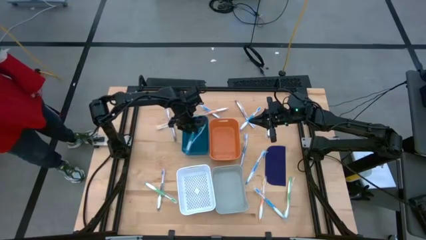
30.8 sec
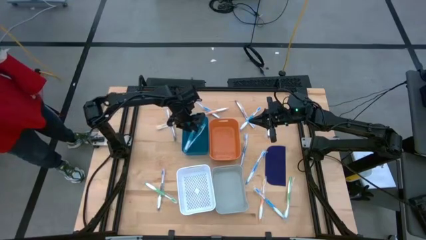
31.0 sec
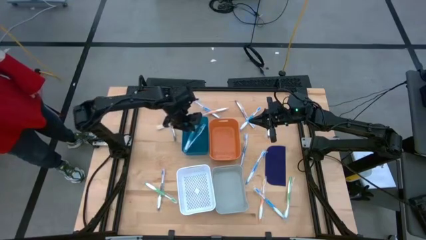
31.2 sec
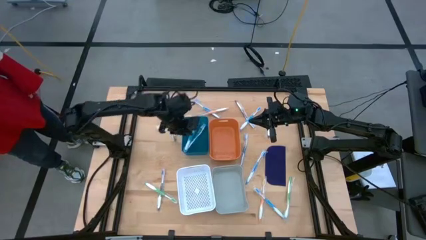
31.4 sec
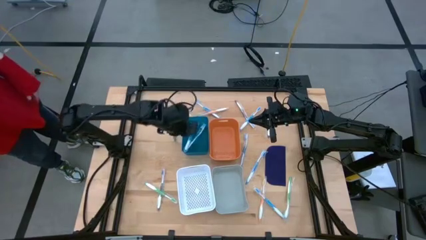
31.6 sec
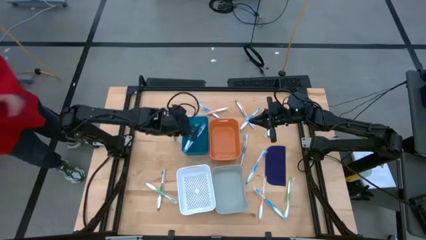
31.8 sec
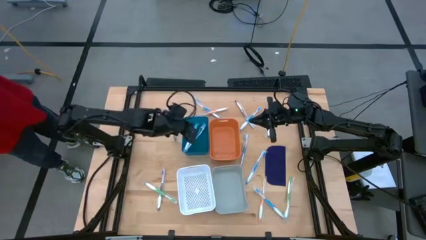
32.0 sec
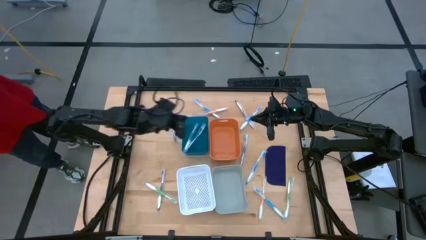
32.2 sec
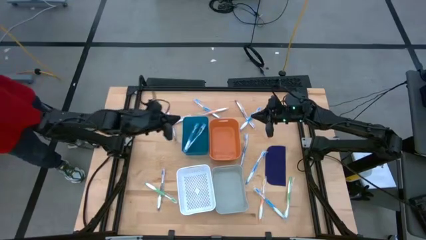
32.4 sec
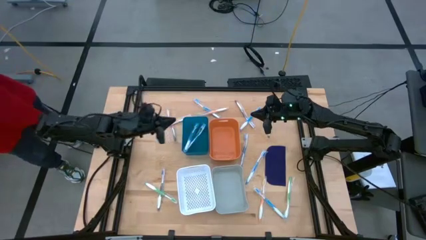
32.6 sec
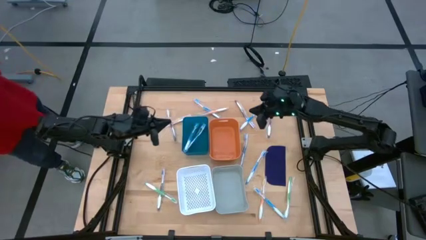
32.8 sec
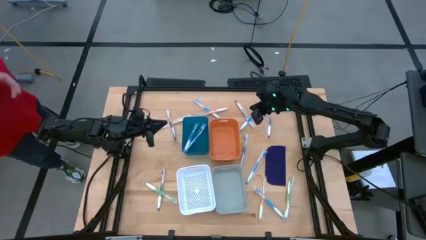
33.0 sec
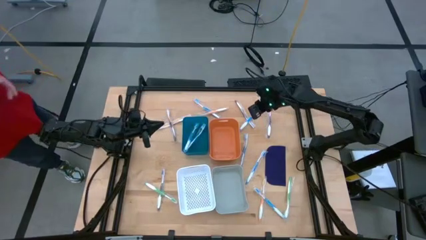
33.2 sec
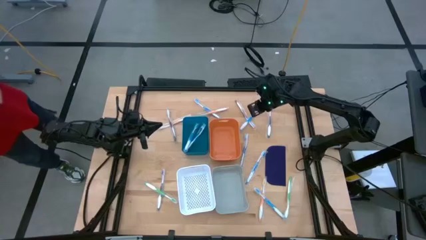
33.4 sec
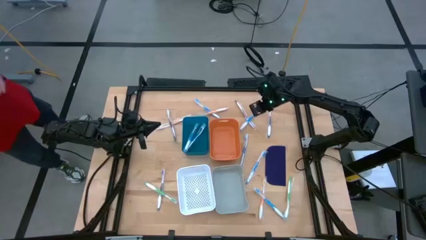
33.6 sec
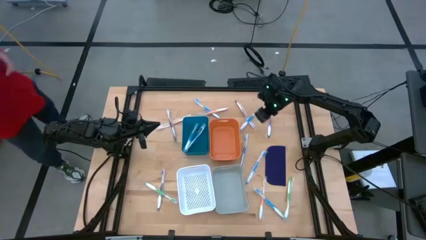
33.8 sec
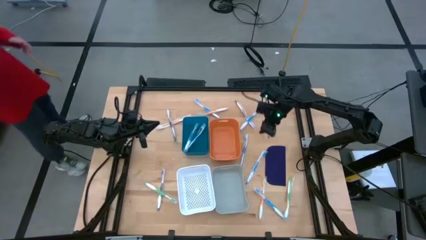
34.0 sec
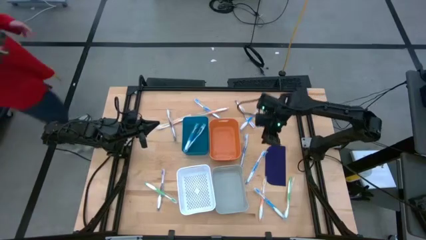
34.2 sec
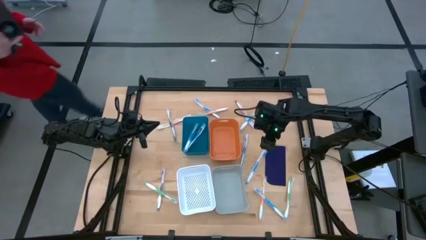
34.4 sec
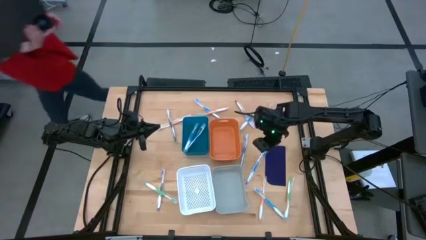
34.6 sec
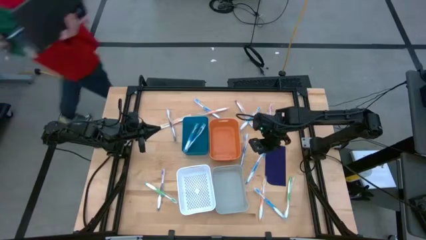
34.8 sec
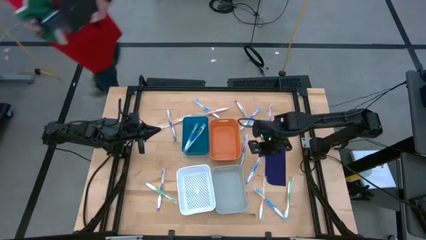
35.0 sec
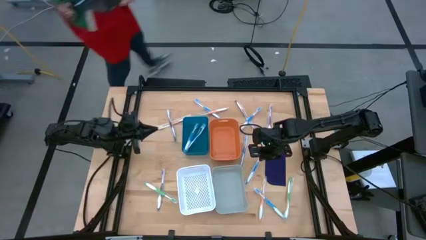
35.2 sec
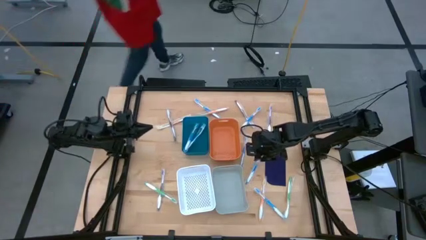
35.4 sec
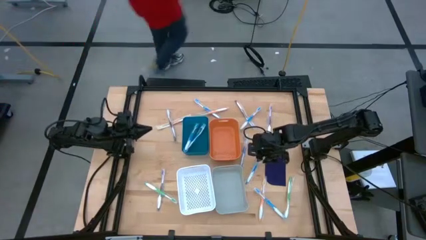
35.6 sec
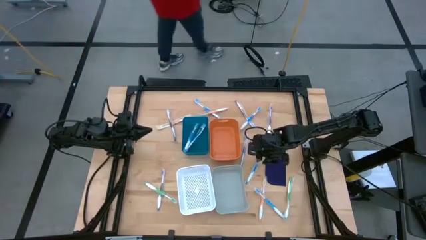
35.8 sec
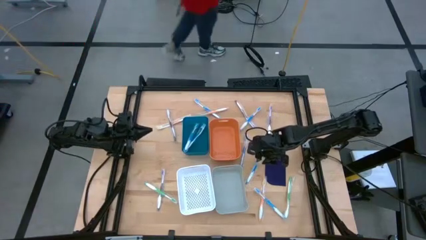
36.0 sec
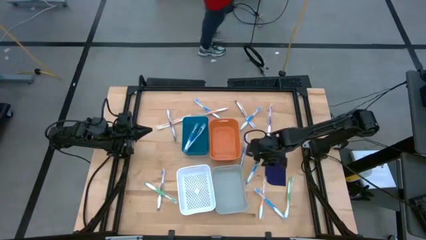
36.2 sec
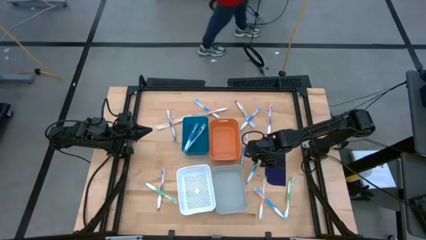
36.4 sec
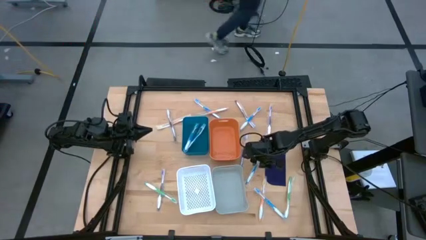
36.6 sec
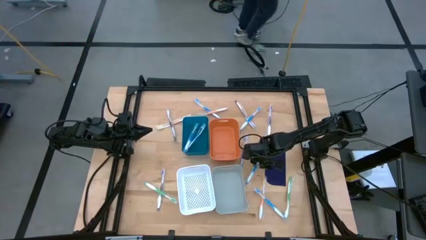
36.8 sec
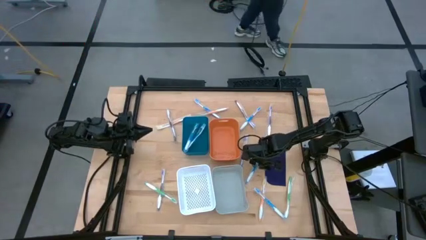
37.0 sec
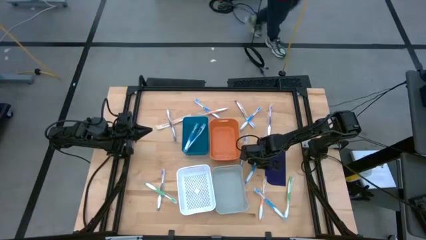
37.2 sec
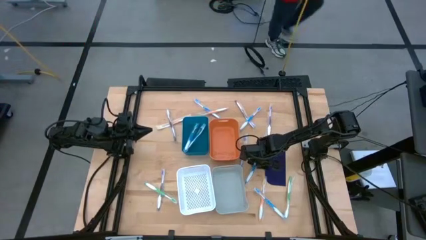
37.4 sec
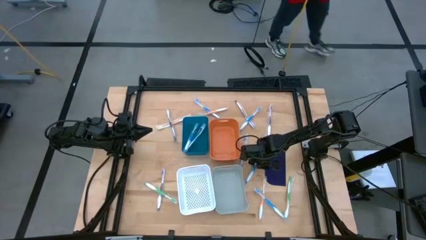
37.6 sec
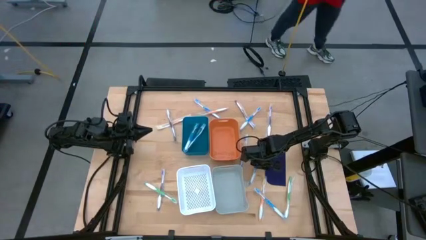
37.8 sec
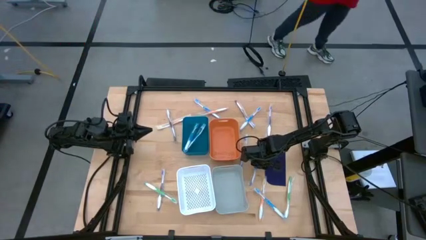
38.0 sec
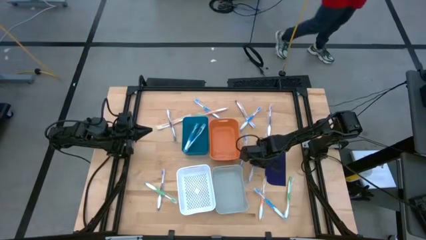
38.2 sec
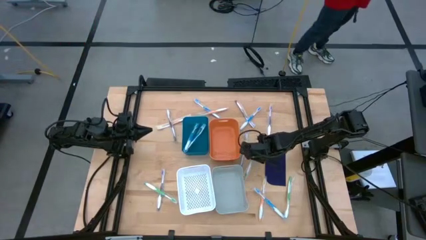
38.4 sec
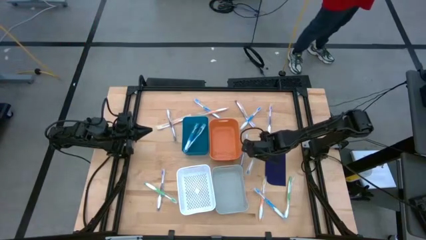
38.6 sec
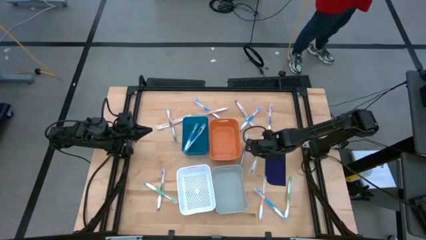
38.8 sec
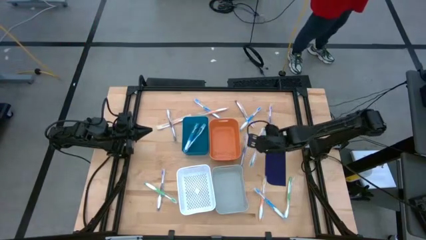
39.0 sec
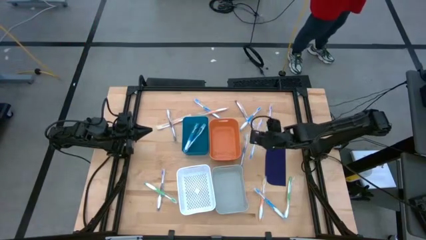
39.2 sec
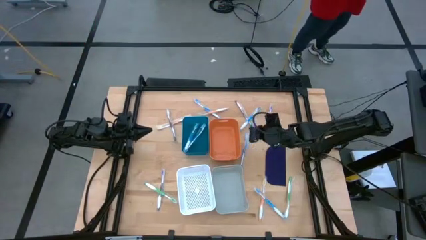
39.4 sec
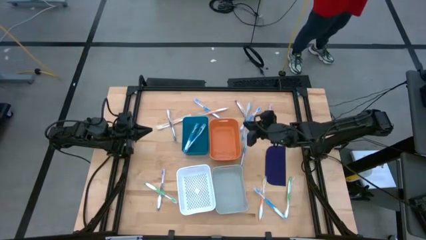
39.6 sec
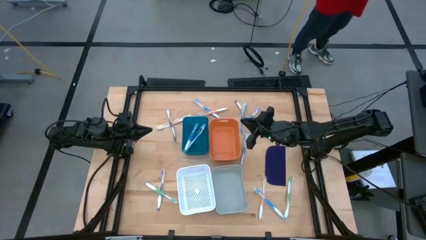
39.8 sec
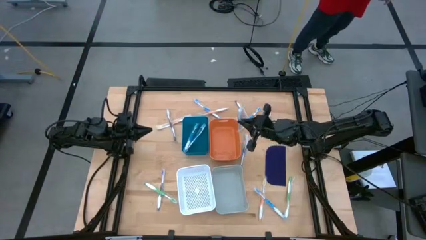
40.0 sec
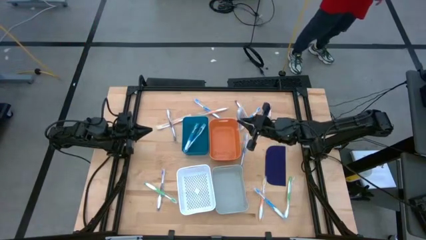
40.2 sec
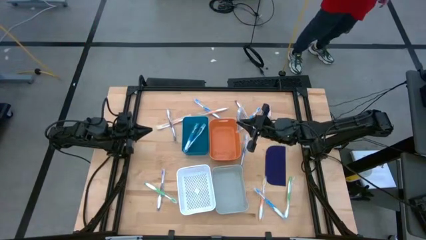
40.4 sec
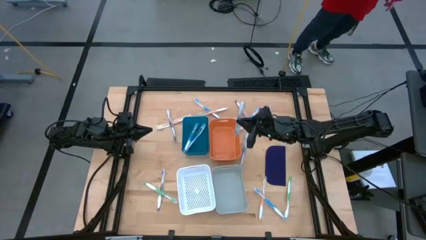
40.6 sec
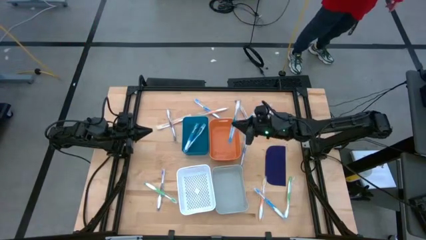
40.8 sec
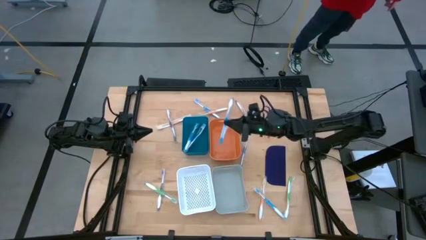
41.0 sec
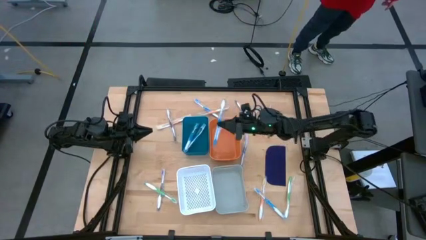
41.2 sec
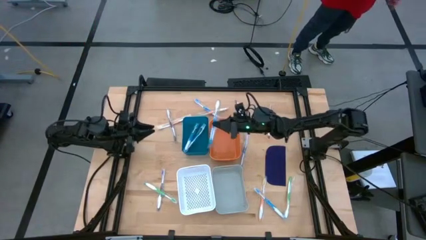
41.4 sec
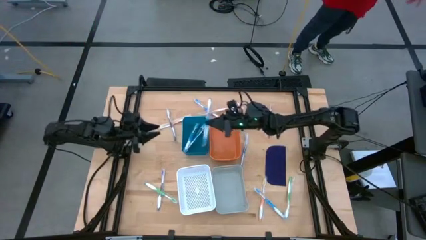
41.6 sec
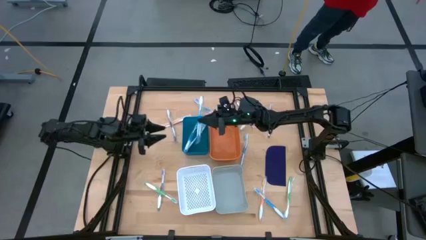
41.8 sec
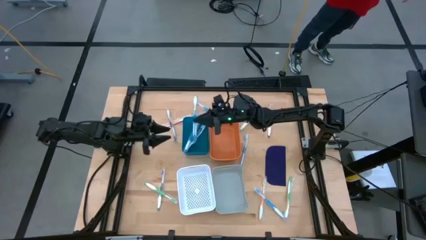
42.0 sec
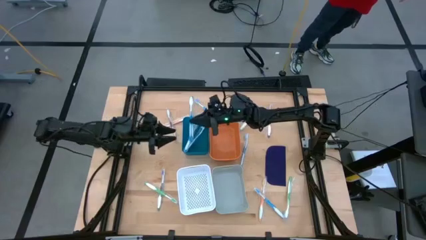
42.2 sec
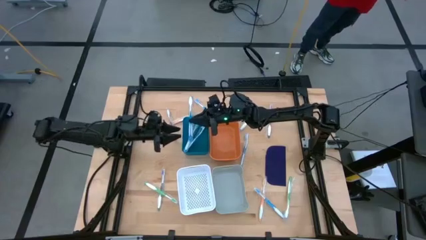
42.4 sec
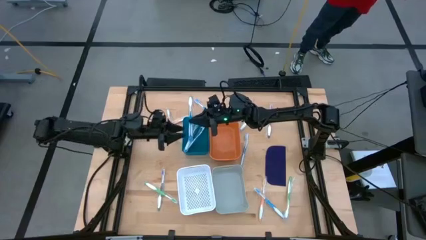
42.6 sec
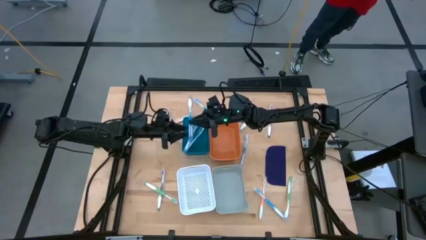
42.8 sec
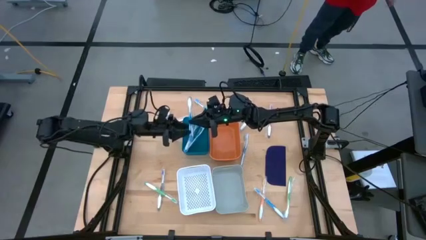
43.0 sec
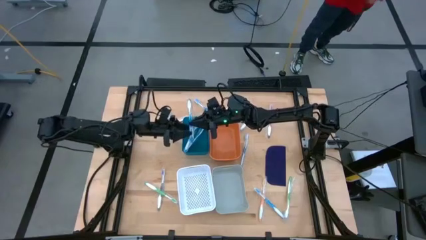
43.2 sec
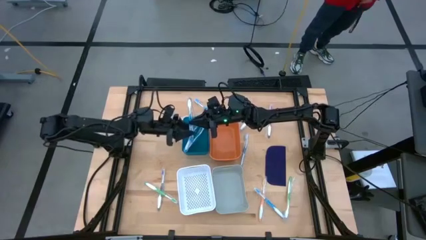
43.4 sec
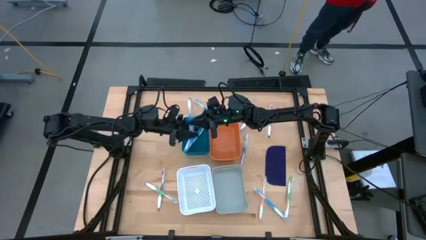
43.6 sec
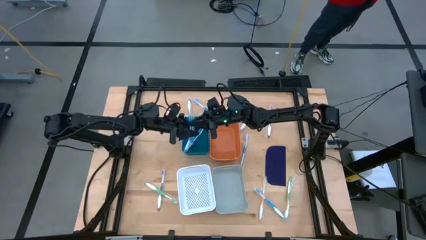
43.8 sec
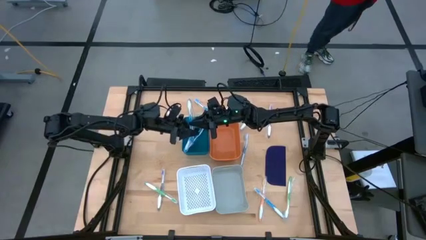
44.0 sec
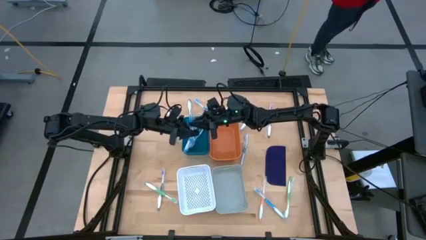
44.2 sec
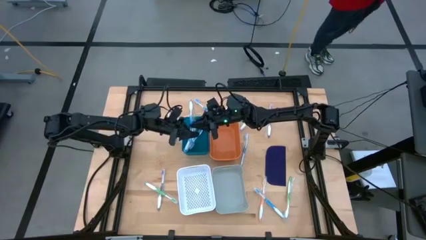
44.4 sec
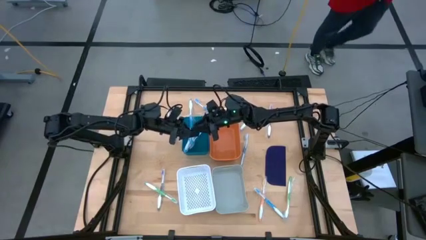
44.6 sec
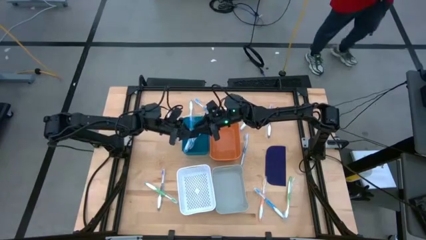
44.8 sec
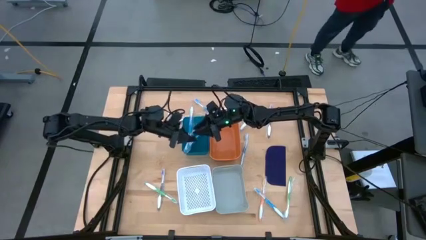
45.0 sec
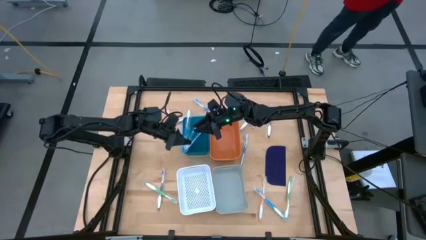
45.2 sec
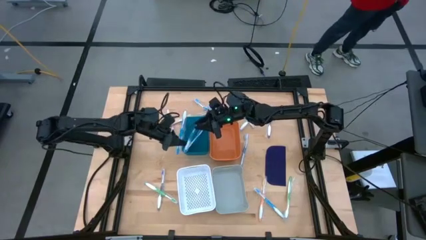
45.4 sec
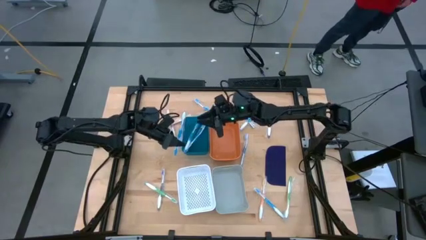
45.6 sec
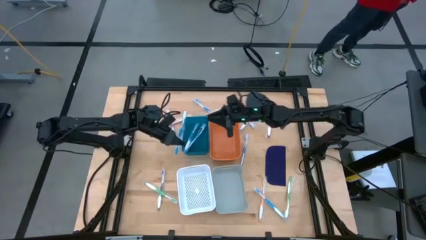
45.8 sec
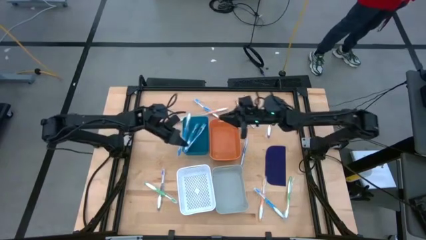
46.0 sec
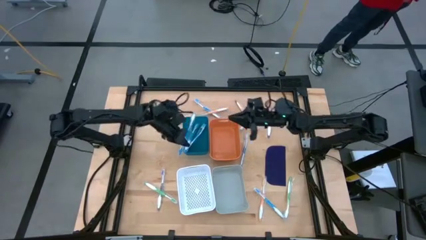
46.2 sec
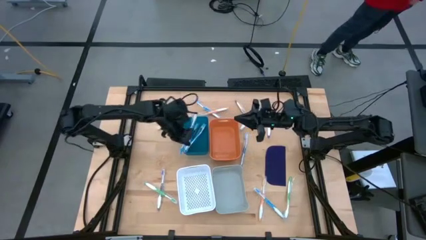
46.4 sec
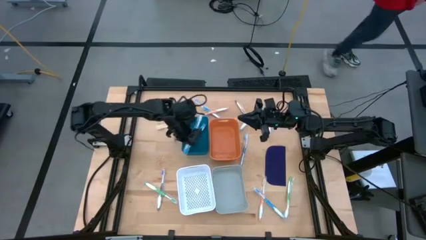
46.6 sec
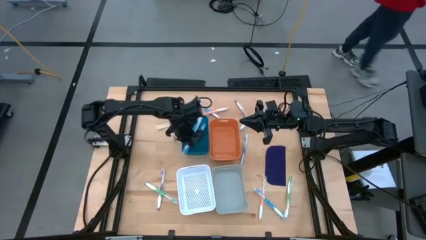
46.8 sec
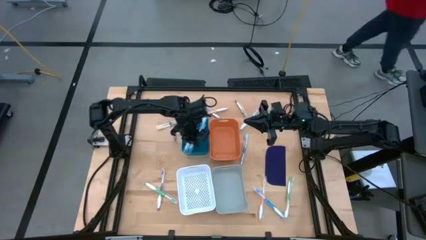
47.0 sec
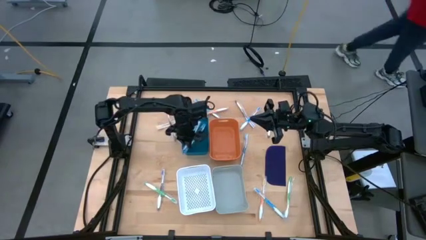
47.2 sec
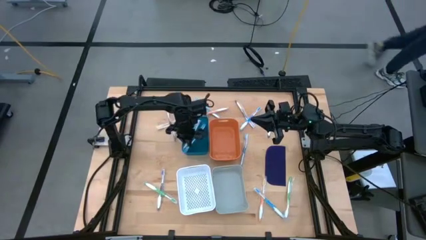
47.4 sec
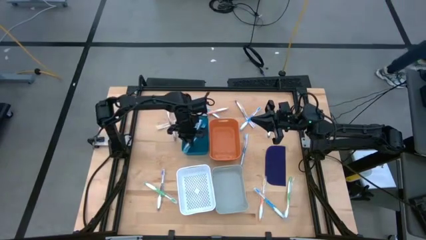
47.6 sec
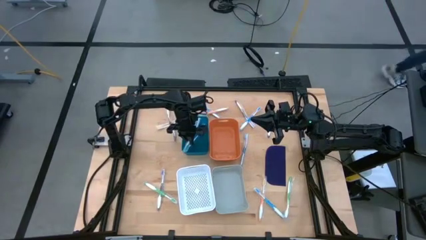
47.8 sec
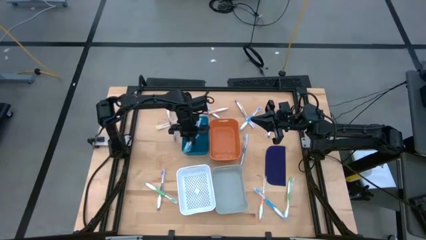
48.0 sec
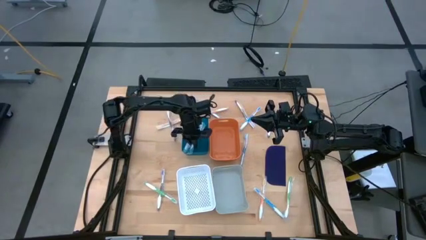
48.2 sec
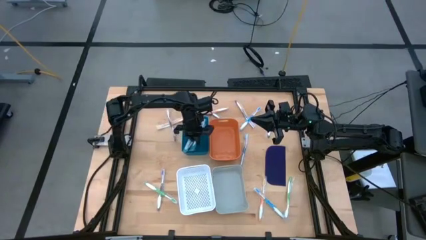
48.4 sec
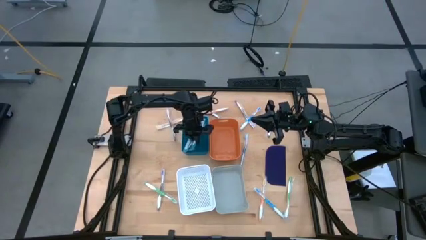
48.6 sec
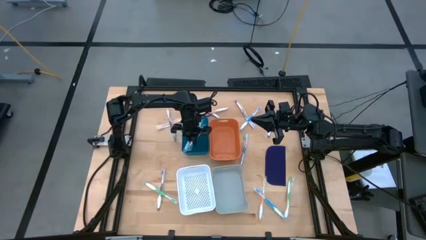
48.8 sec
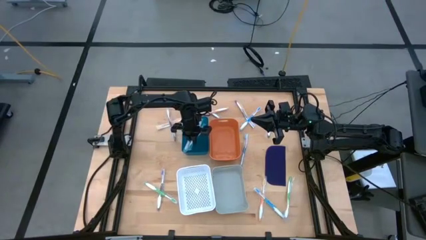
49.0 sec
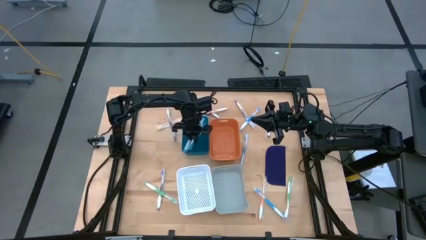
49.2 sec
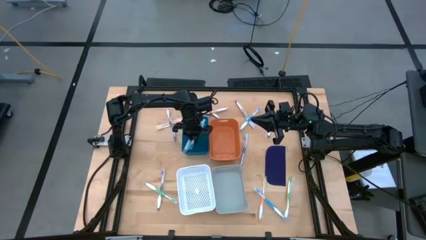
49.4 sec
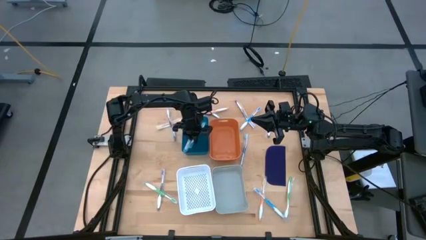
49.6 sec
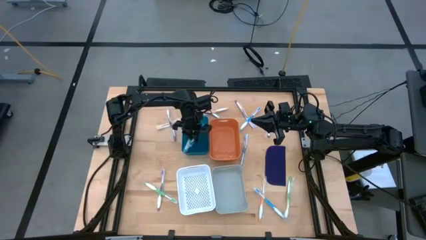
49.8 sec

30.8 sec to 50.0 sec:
Task: Pick & Place Toothbrushes
Put the blue toothbrush into the blue bin
